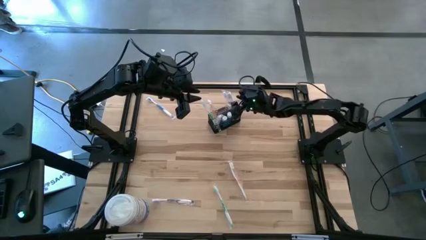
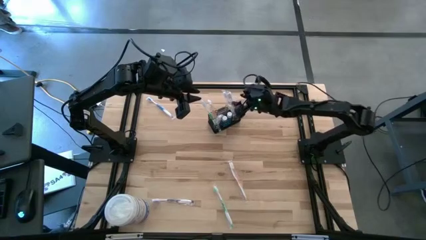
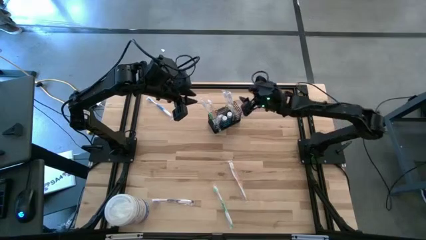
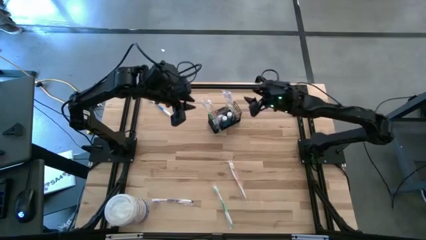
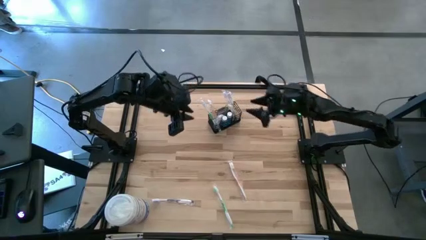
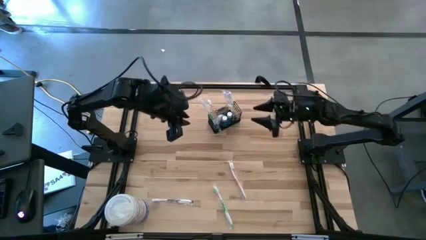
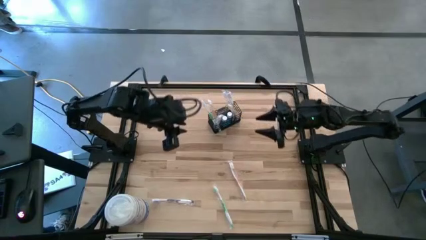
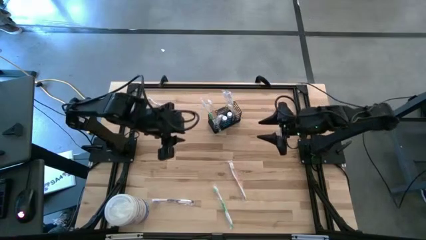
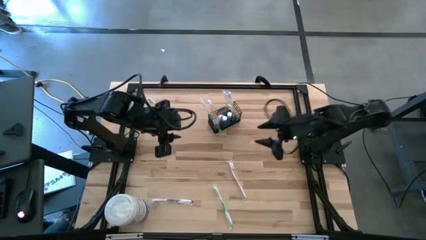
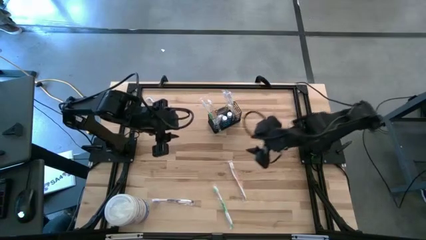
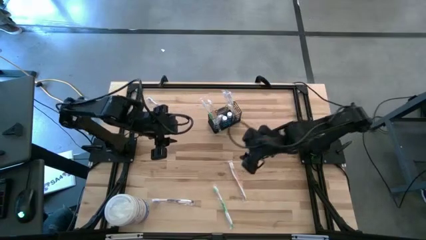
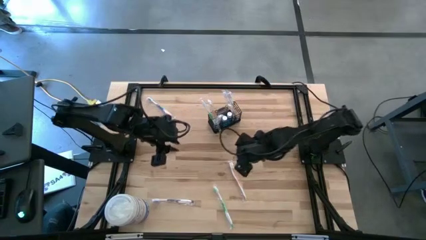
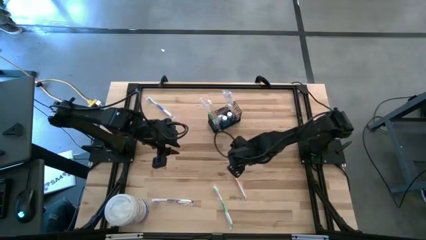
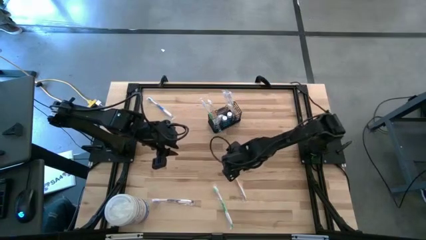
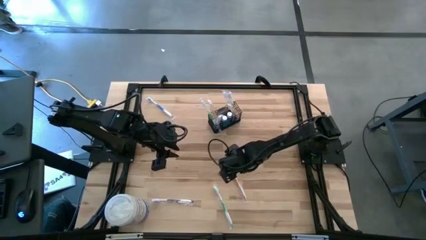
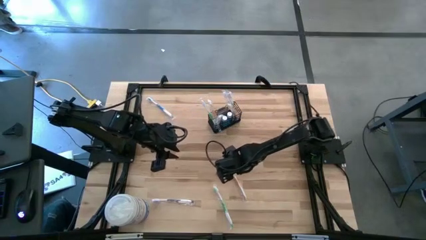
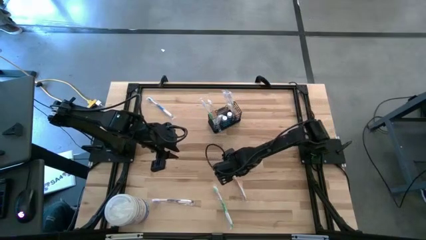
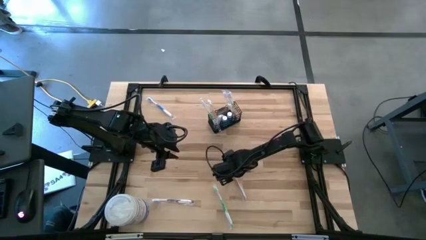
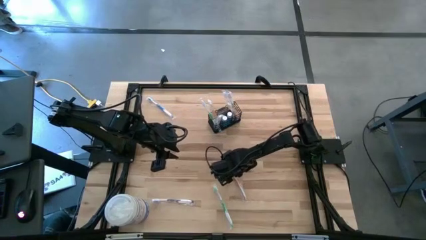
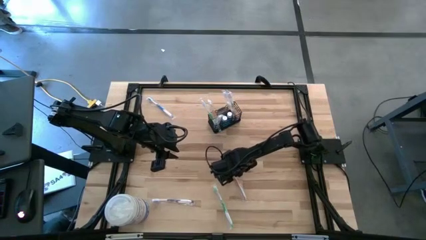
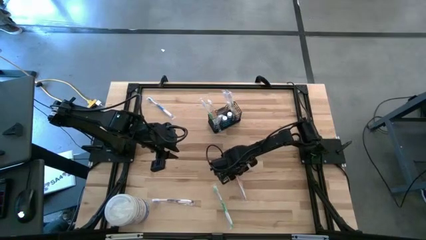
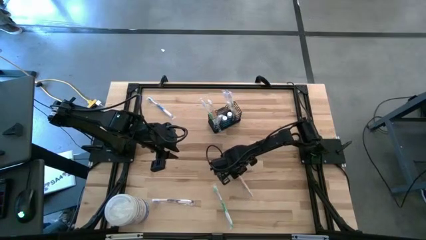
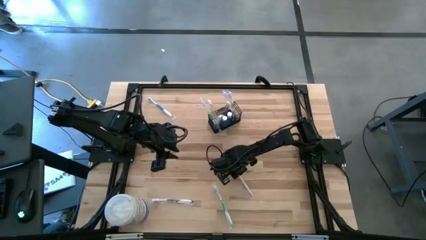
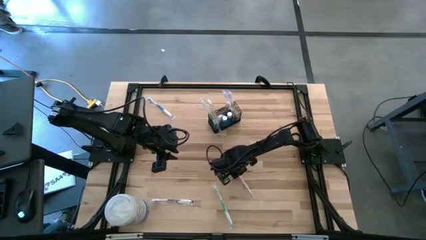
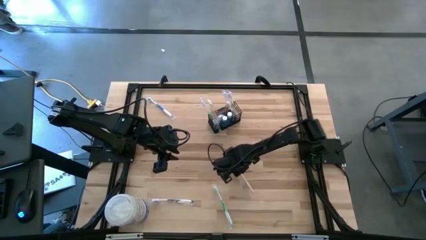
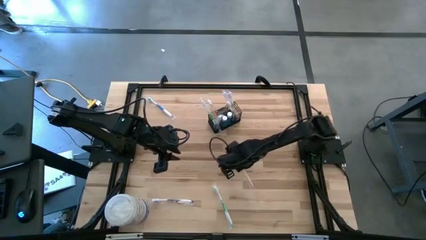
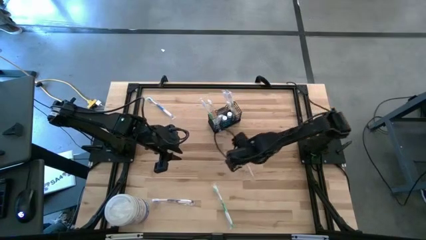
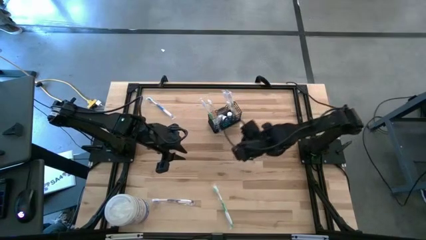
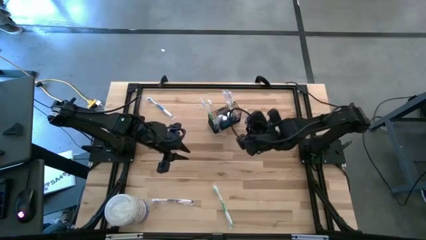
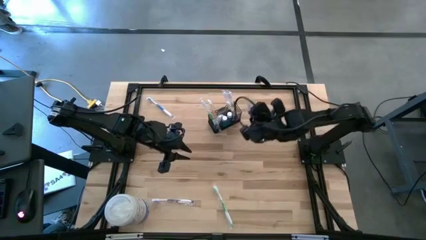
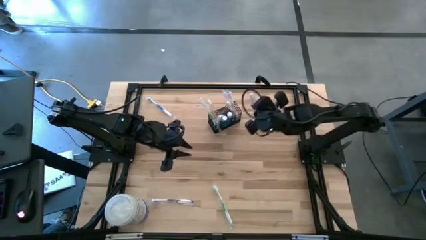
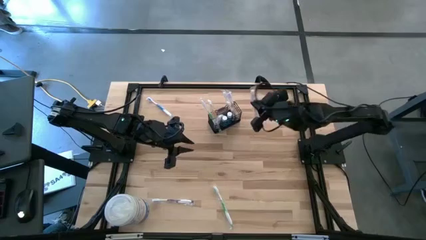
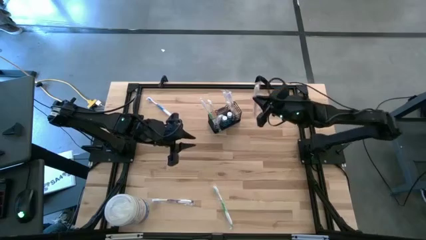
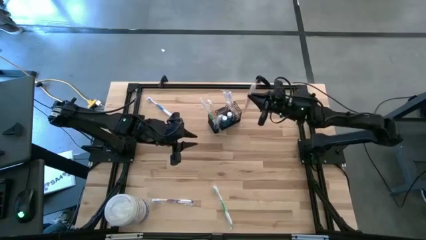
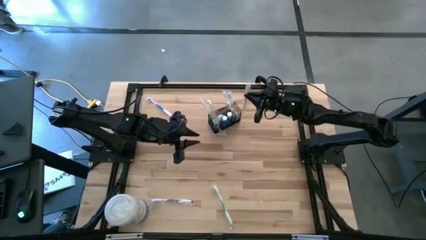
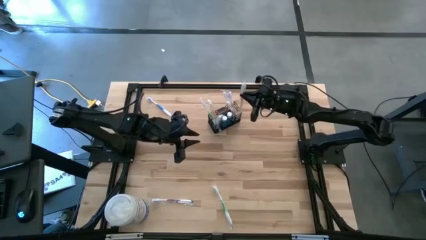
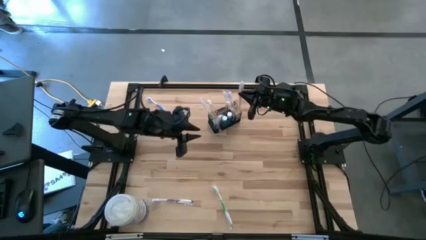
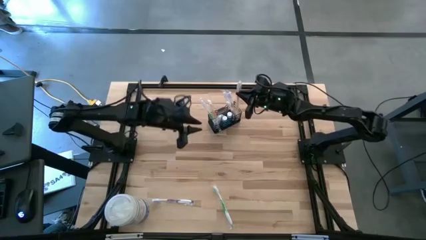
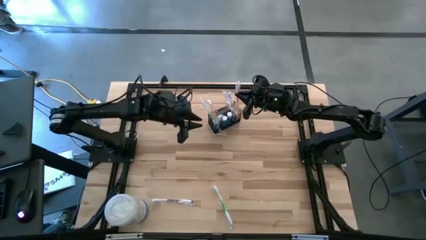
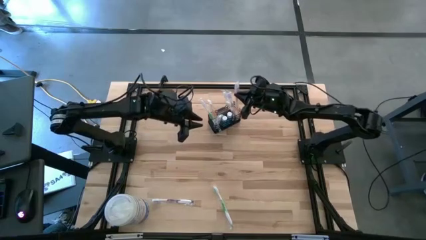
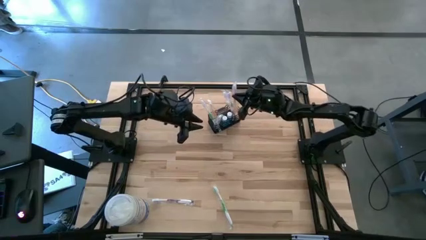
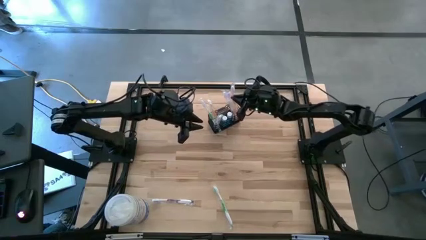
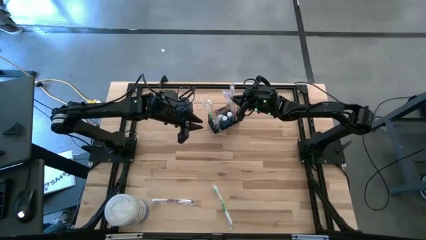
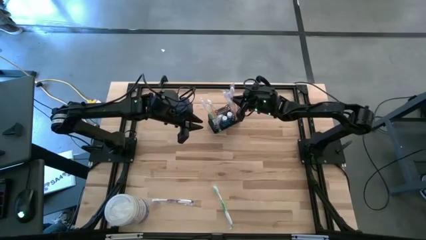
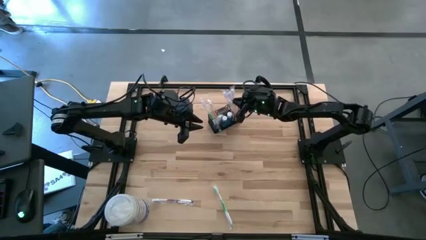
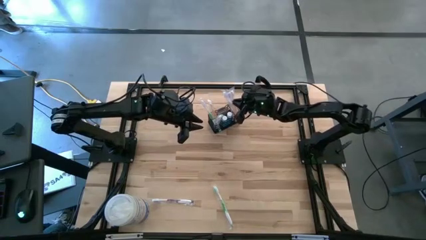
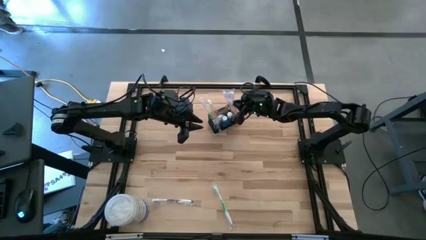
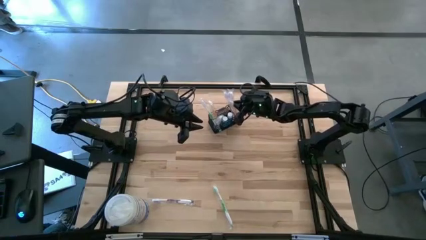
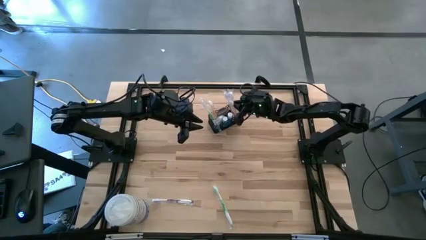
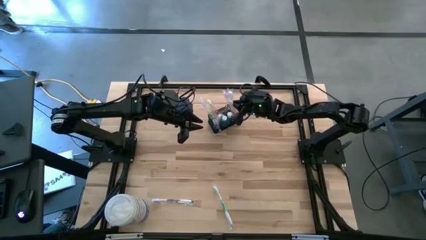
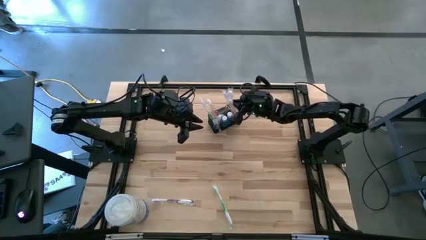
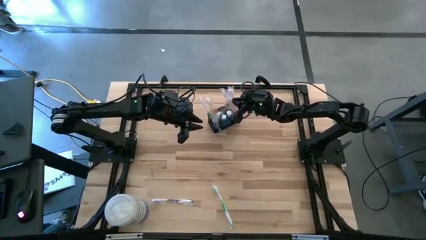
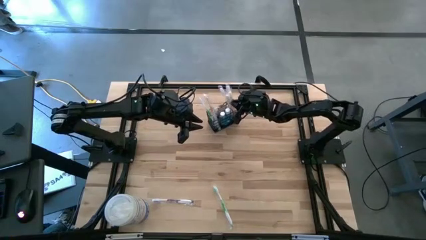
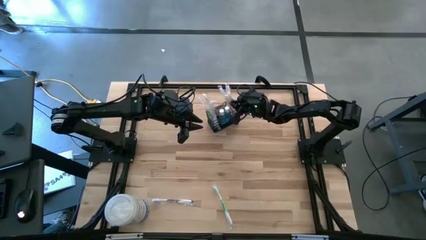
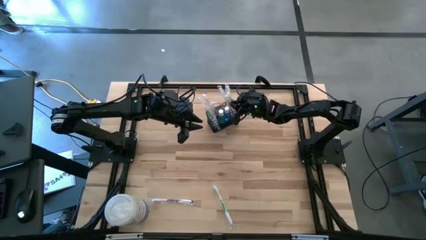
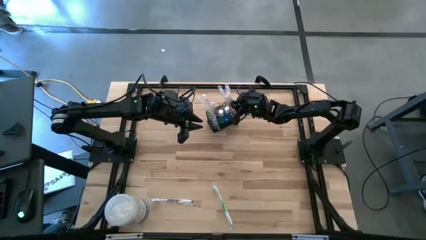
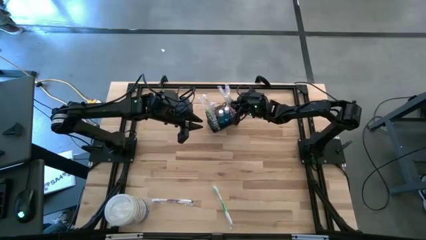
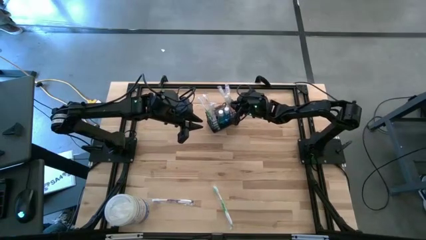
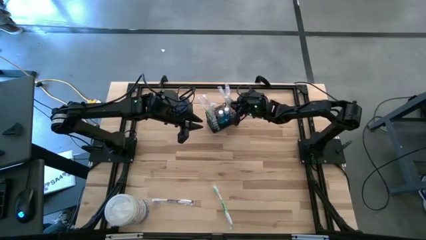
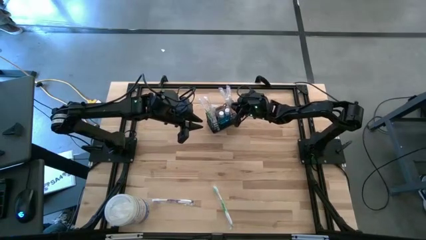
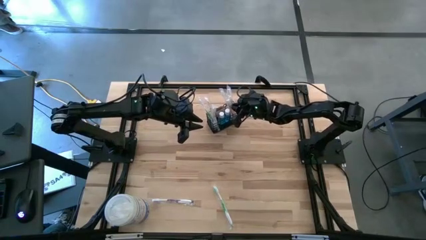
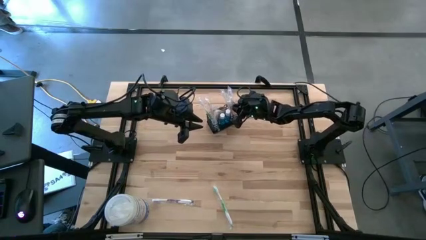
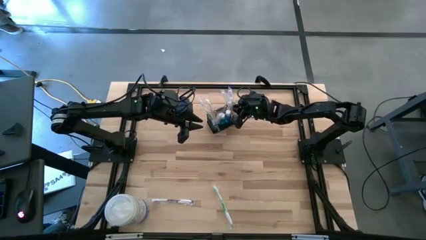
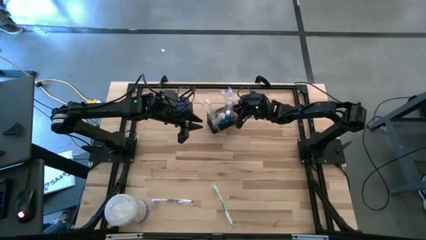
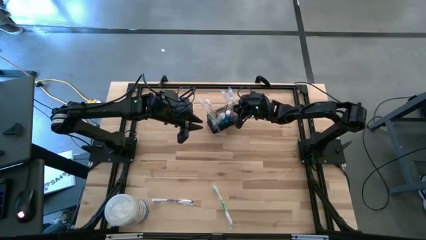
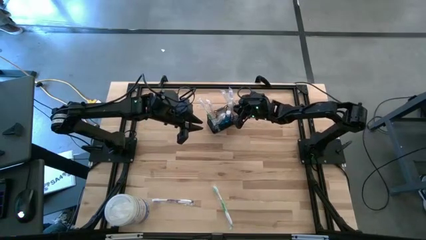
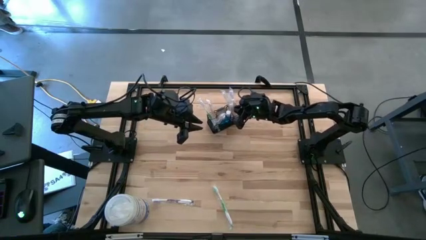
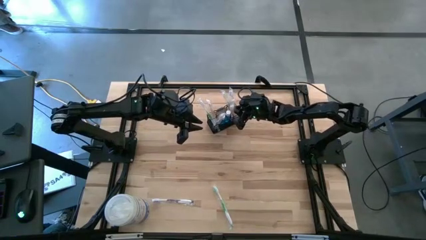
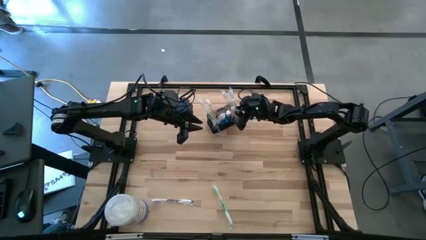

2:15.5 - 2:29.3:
Task: Pick & Place toothbrushing station
Put the orange toothbrush into the mesh organizer

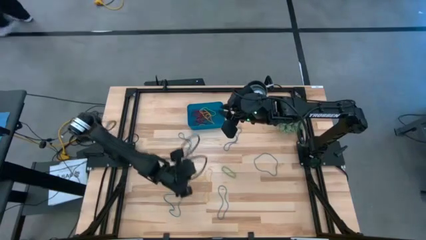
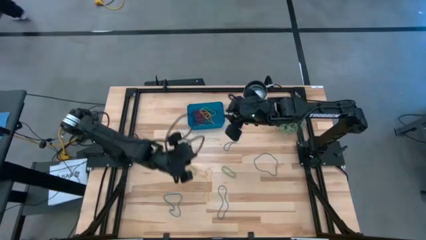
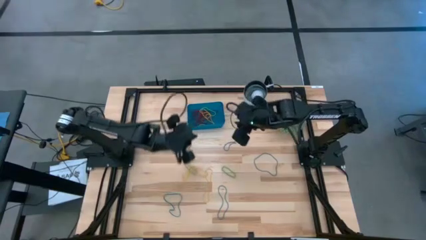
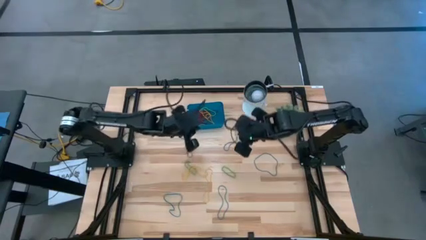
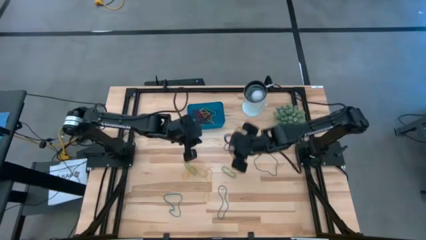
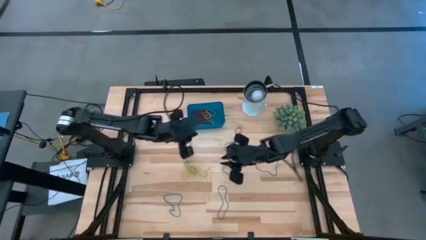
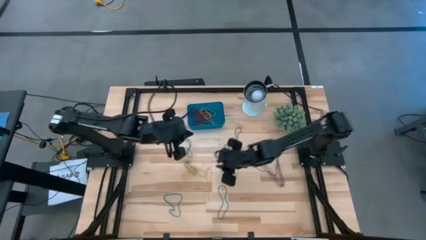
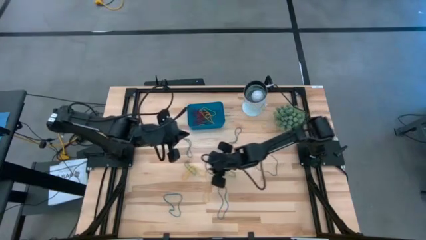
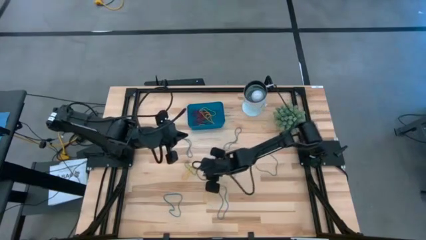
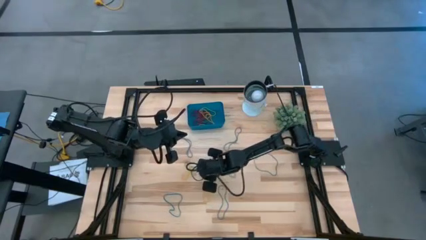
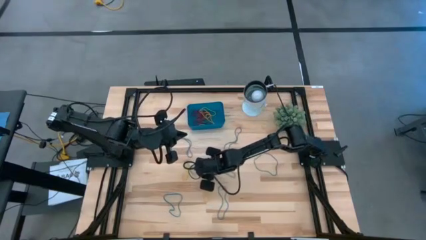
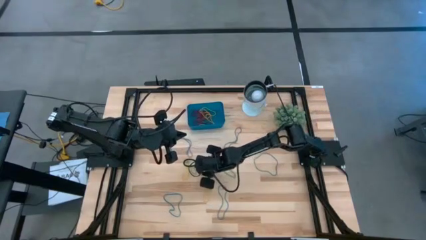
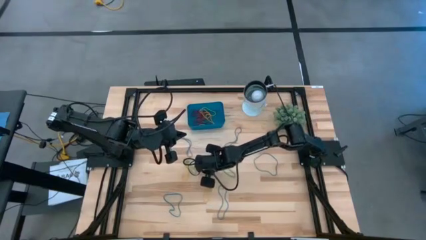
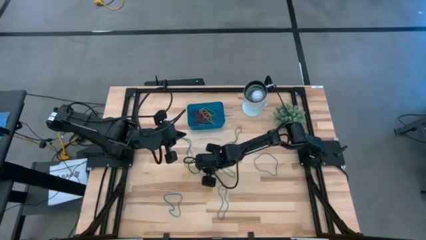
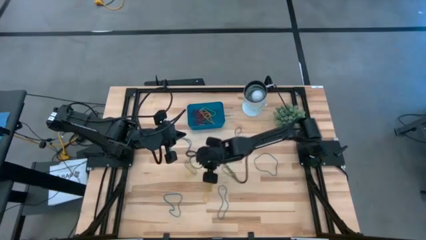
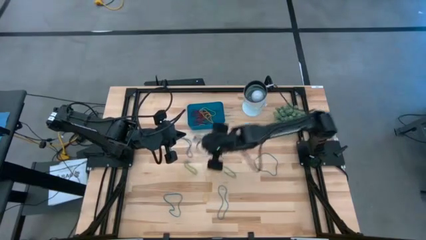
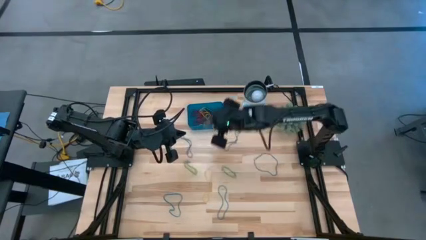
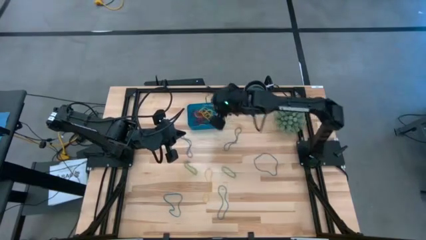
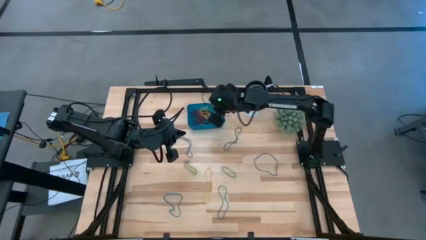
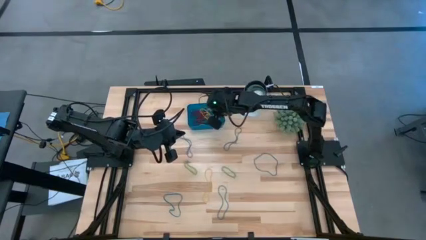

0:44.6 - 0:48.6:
Task: Pick and place items into bin
Put the yellow rubber band into the blue bin
